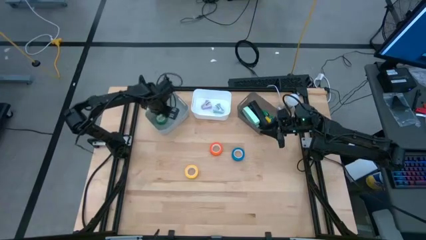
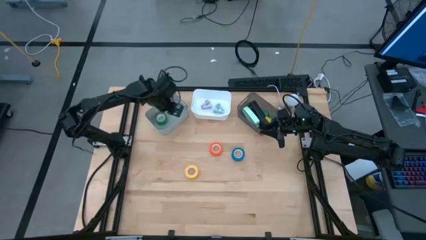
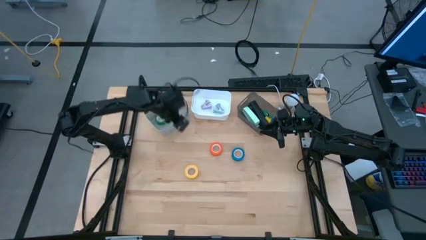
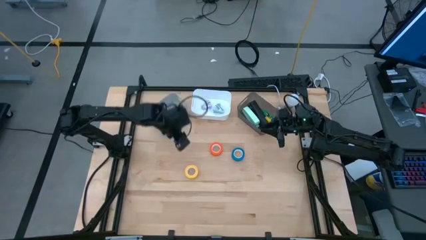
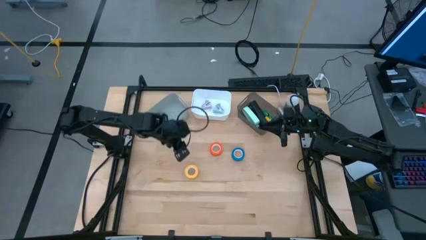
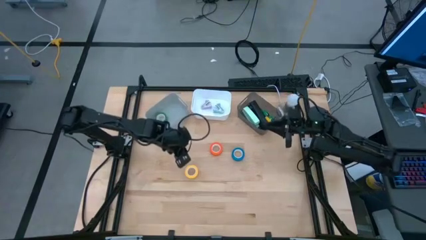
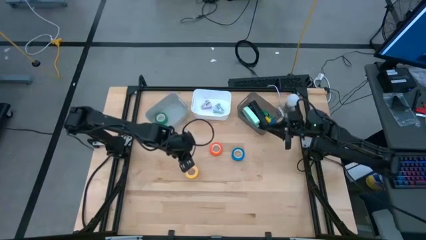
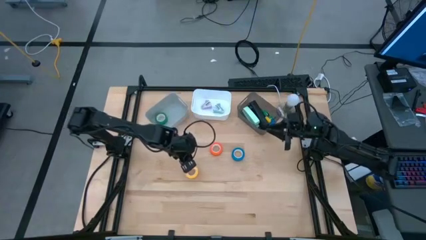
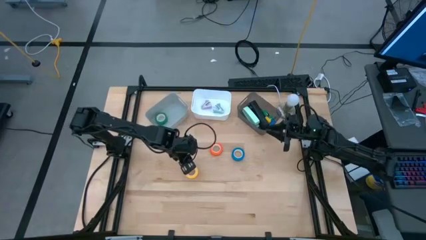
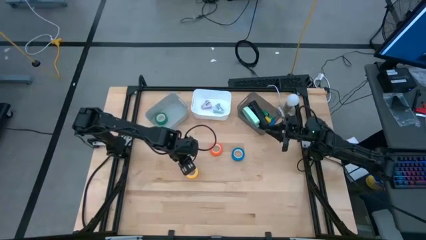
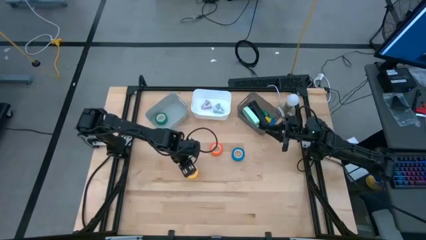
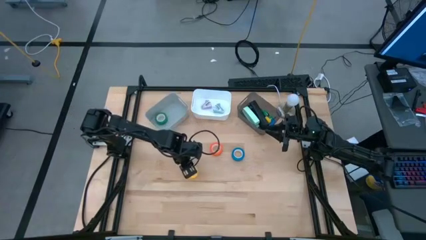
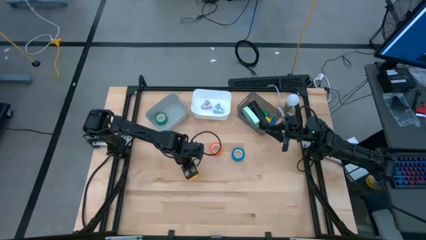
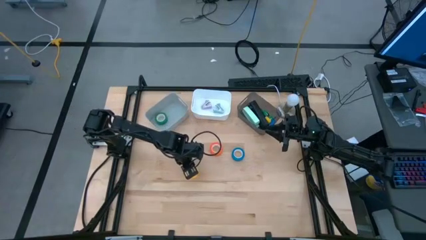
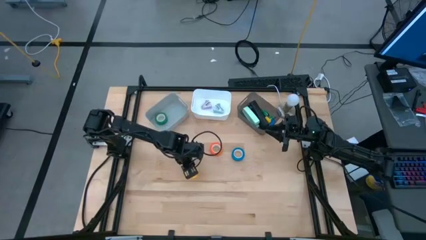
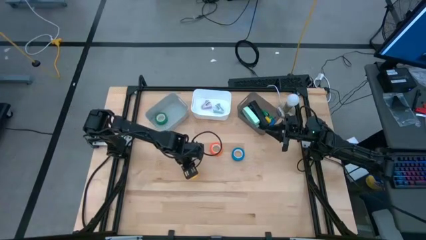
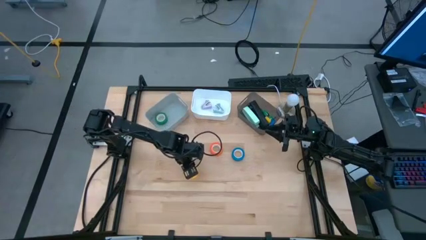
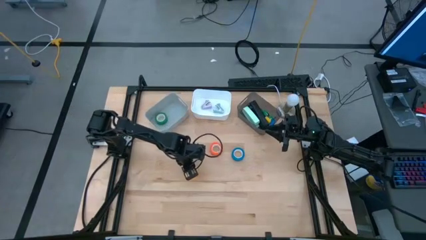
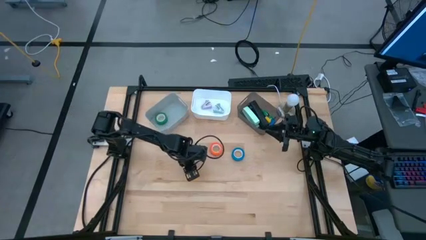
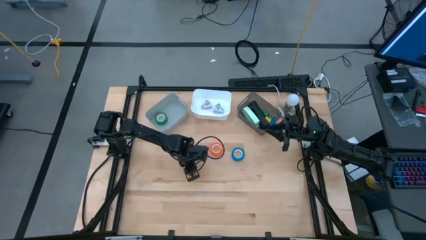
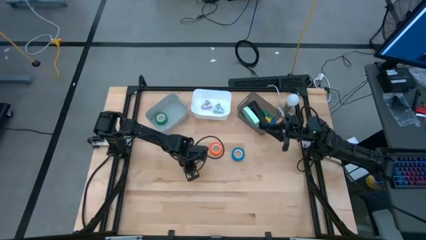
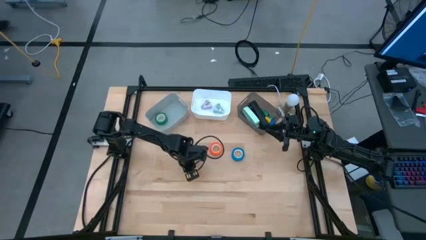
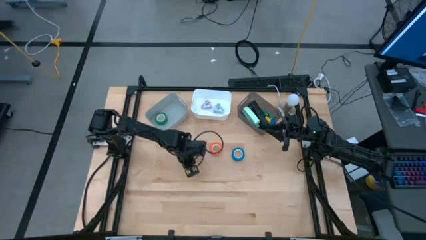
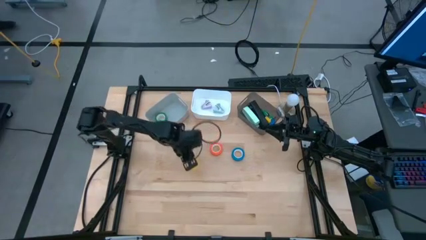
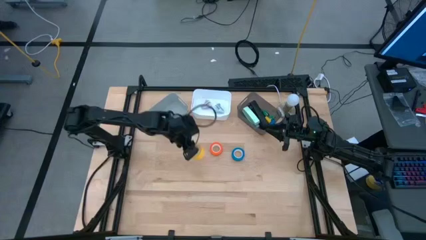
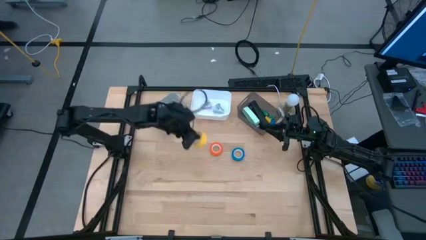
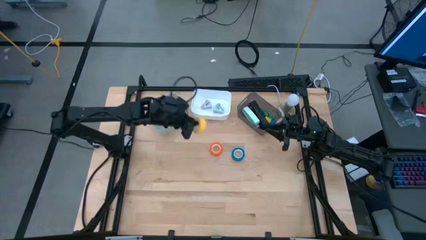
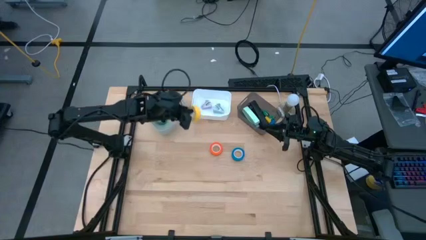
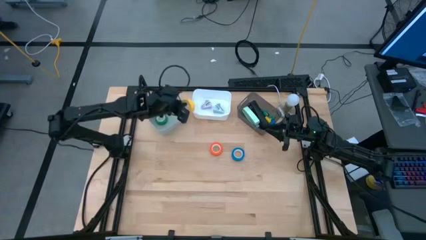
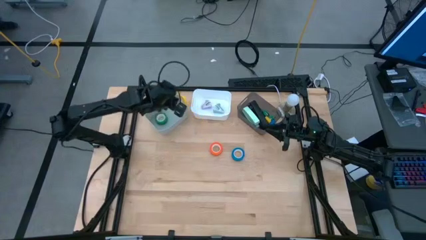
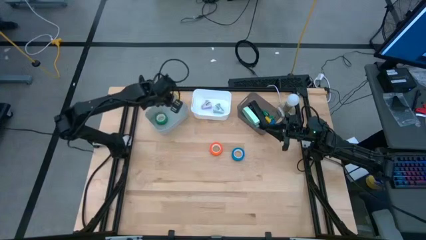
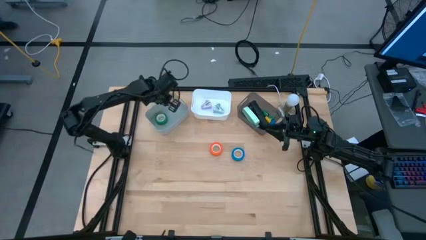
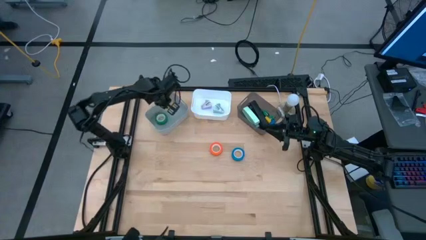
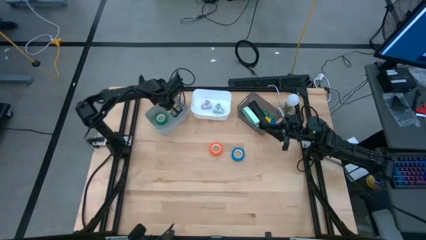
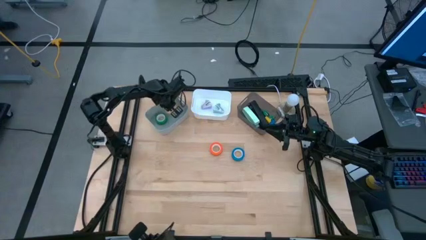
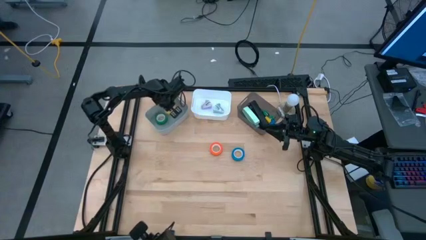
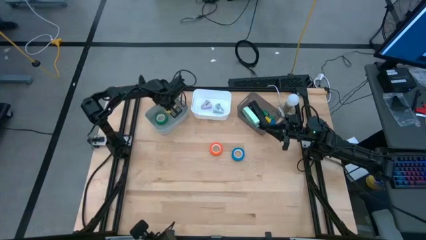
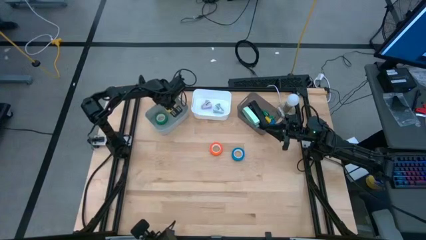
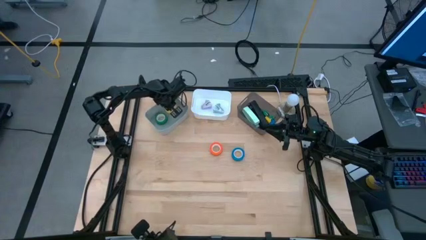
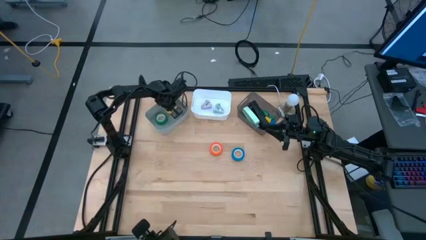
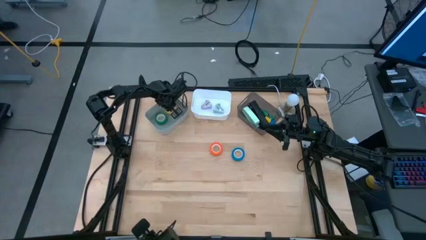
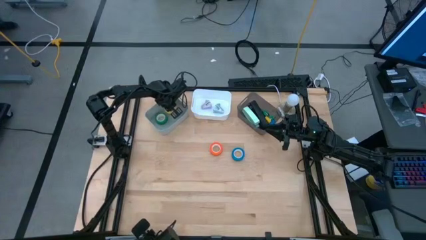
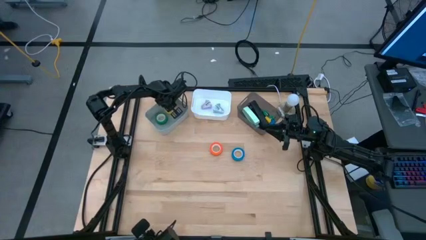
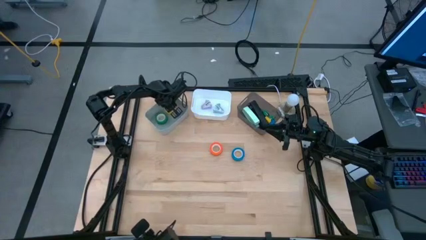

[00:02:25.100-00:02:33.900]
Task: Pick and place Stapler, Stapler remover, tape
Put the yellow tape into the gray bin

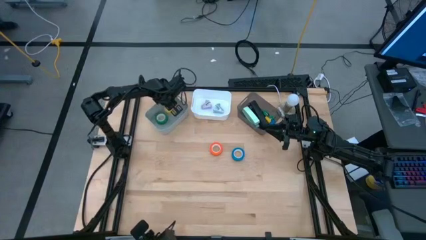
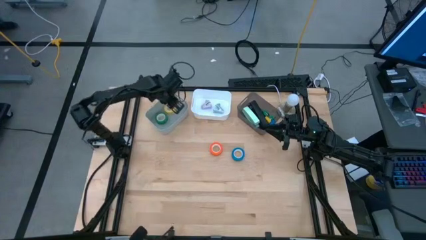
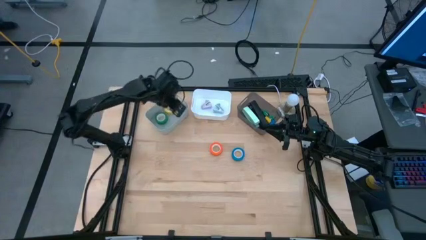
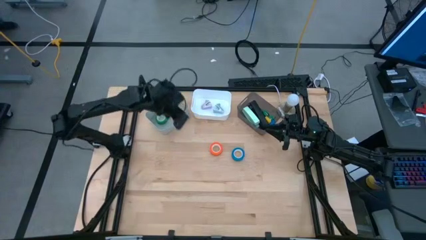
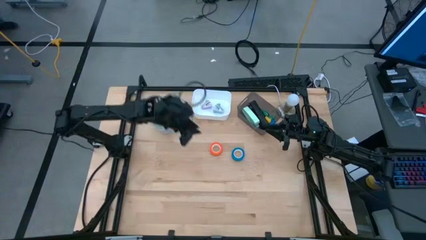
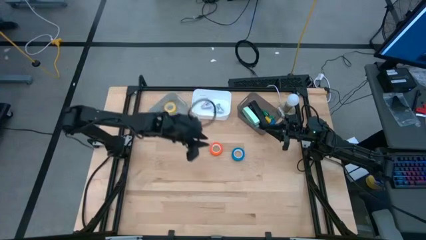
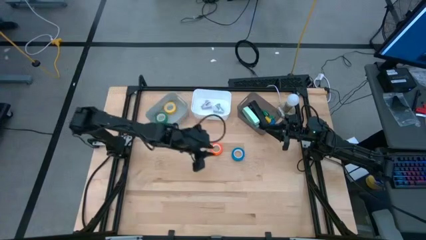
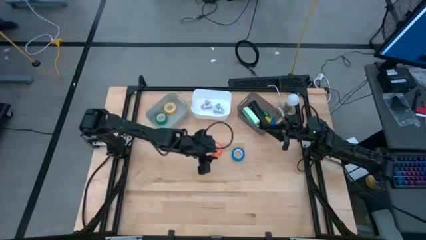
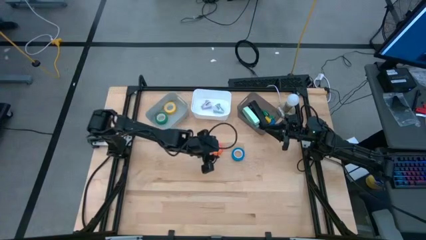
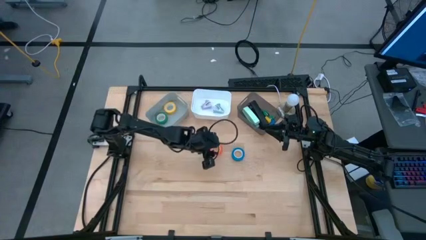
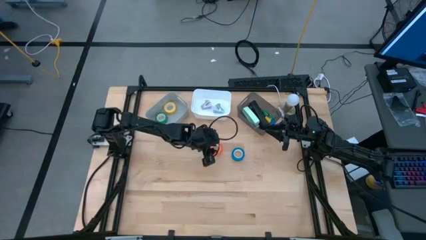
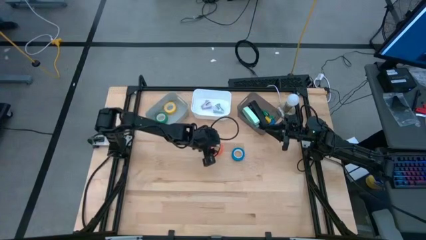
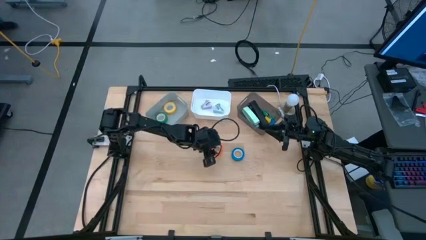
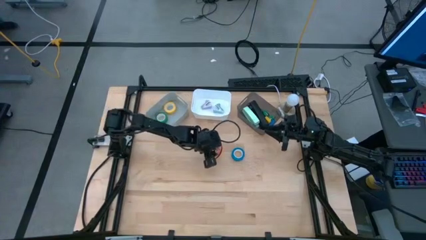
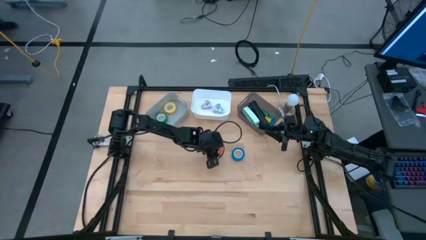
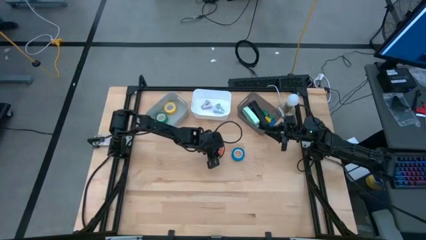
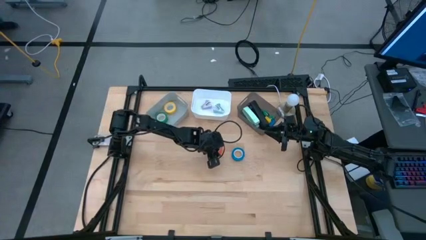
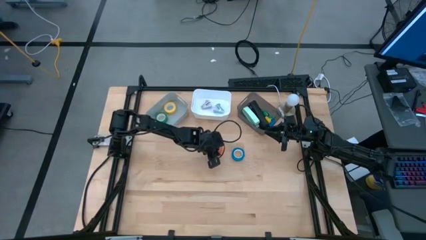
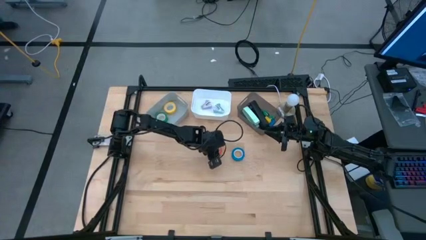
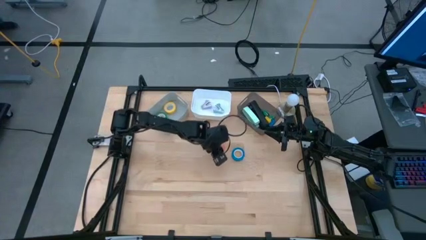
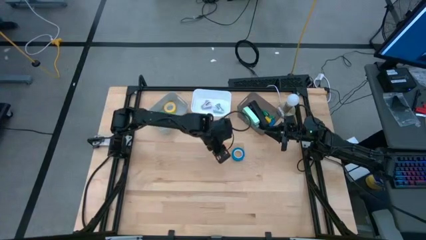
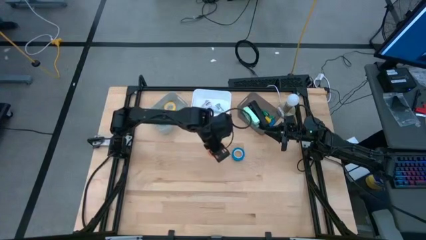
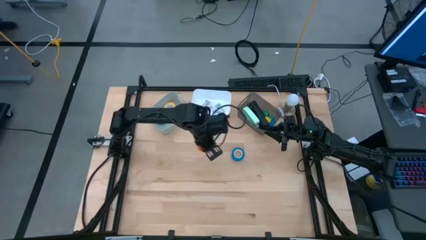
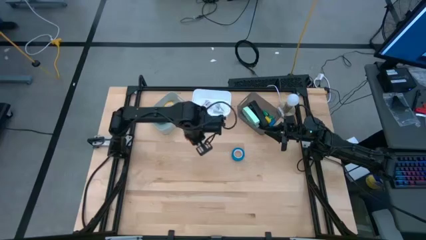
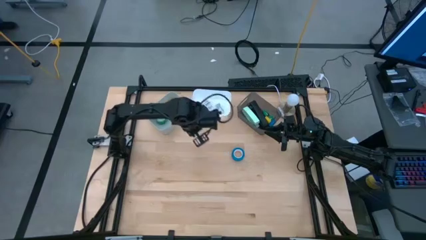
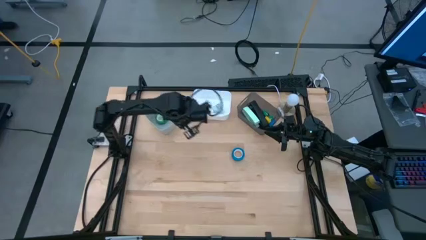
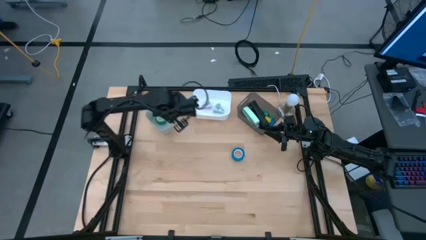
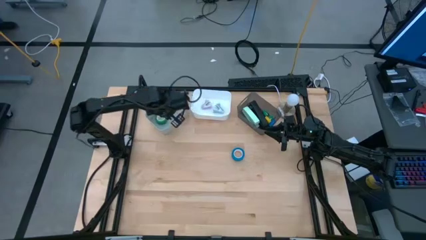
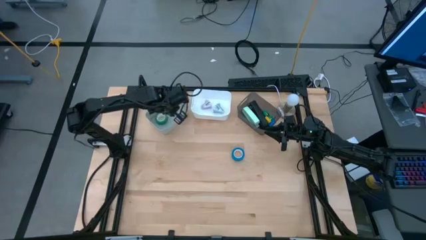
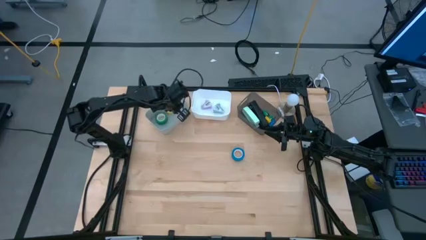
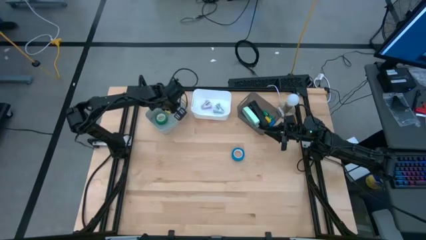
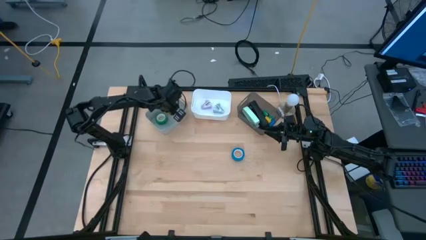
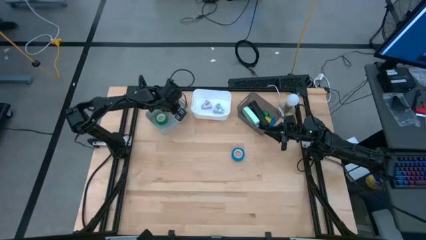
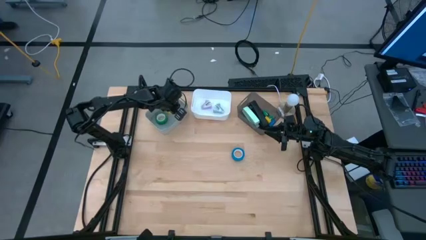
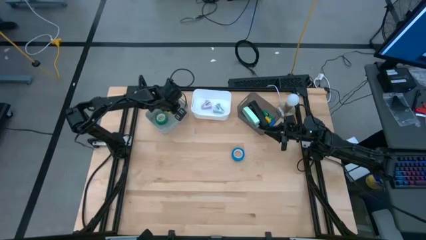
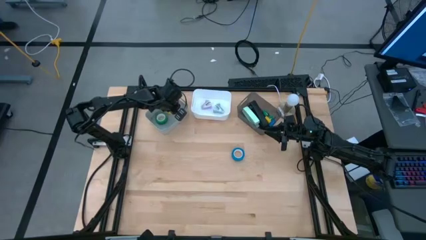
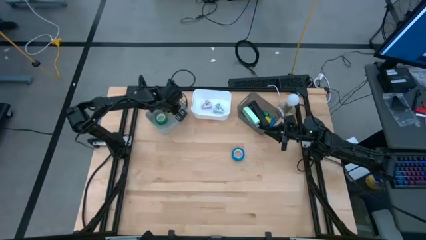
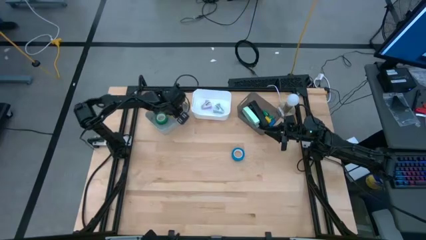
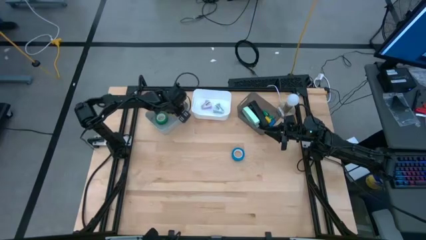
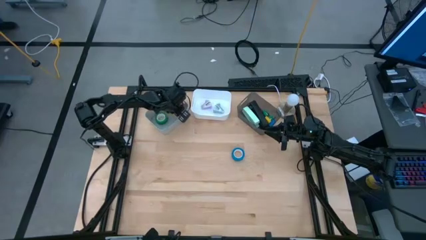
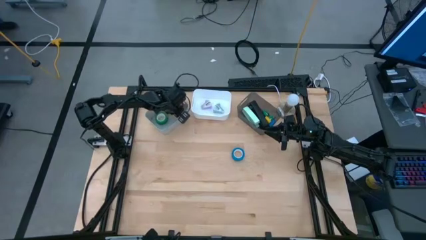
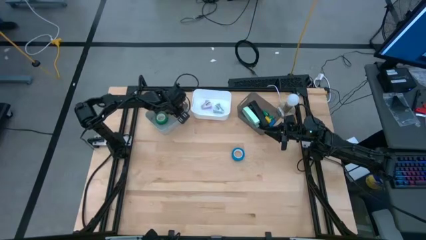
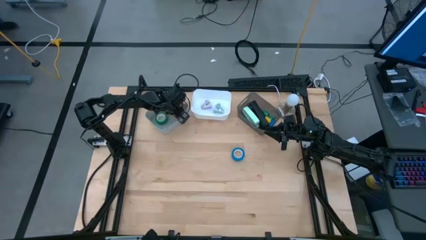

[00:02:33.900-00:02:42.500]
Put the orange tape into the gray bin
